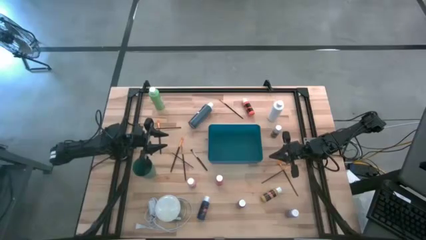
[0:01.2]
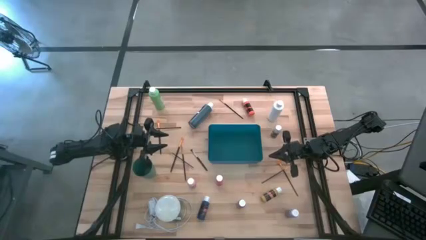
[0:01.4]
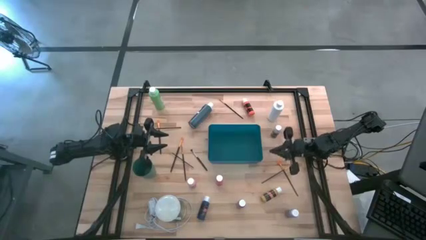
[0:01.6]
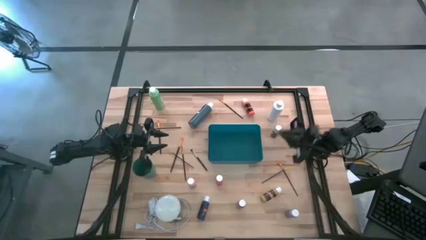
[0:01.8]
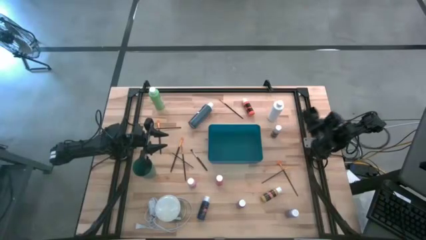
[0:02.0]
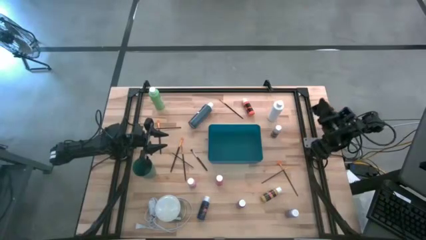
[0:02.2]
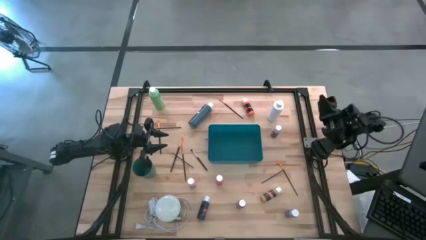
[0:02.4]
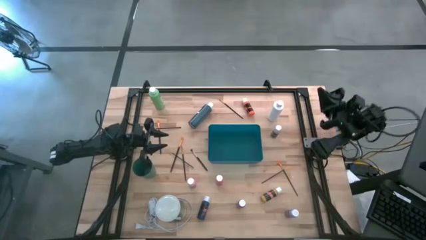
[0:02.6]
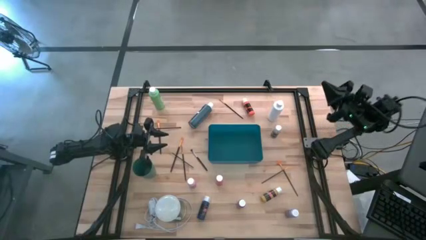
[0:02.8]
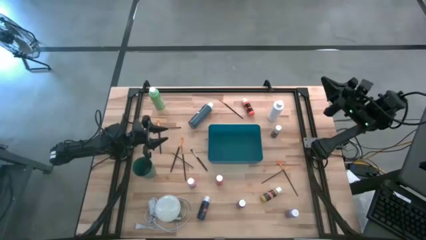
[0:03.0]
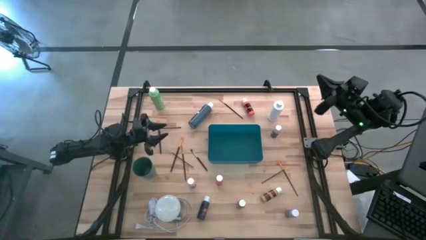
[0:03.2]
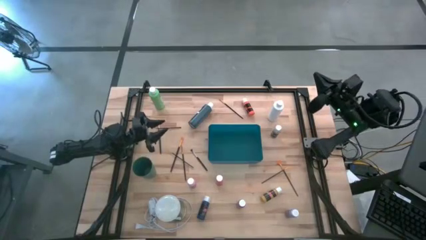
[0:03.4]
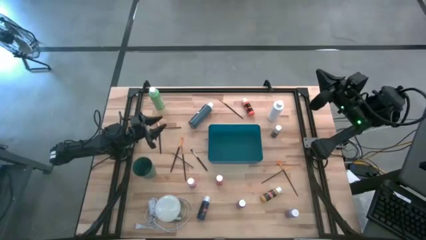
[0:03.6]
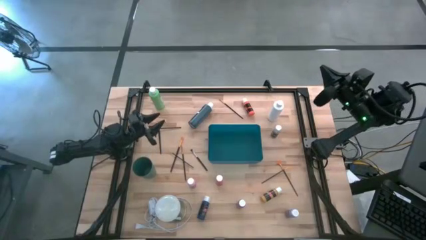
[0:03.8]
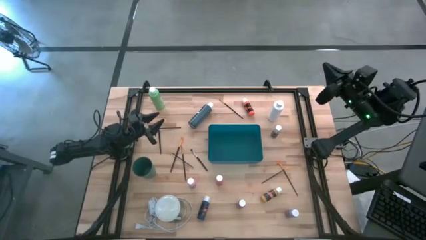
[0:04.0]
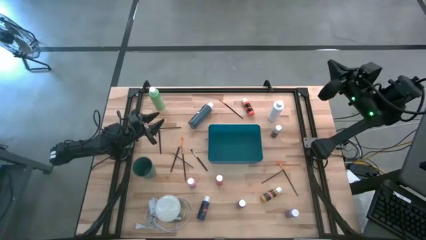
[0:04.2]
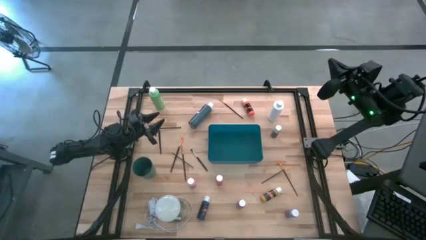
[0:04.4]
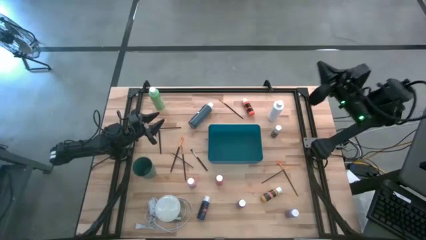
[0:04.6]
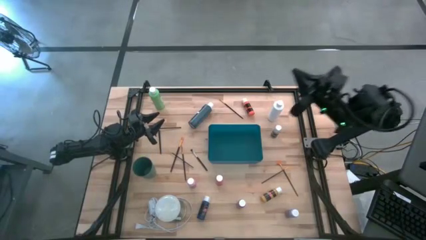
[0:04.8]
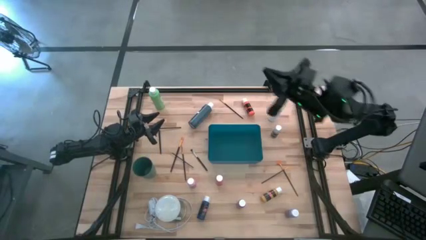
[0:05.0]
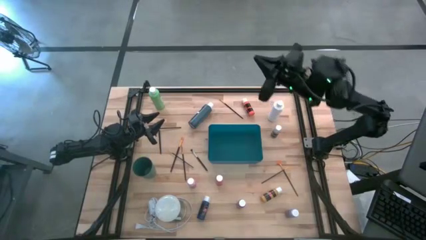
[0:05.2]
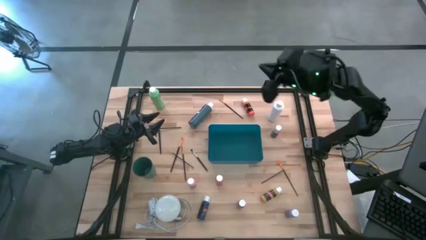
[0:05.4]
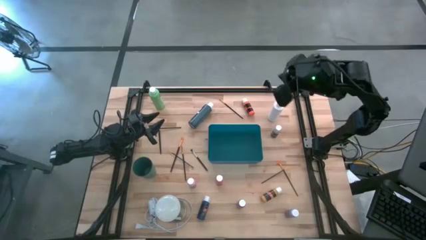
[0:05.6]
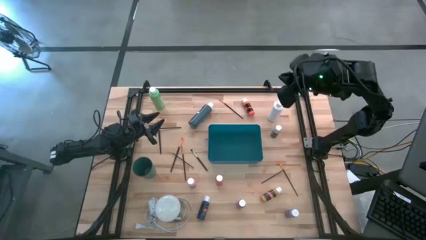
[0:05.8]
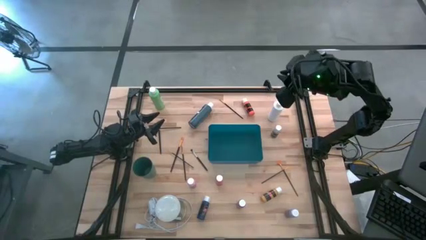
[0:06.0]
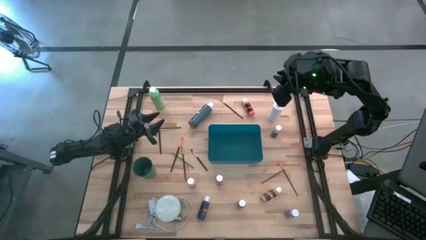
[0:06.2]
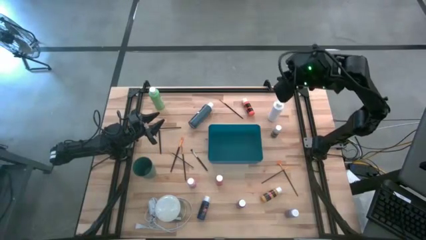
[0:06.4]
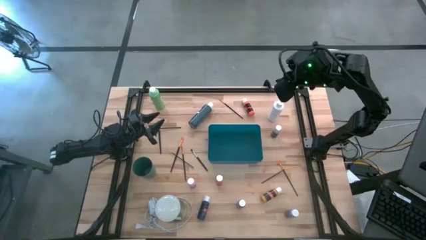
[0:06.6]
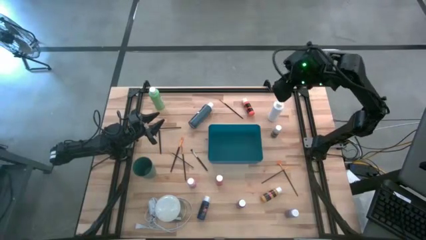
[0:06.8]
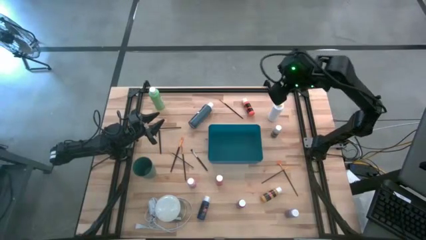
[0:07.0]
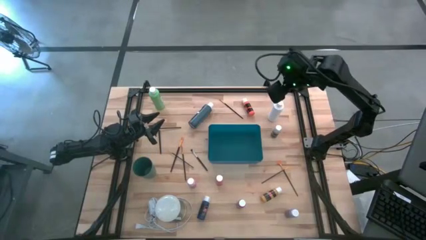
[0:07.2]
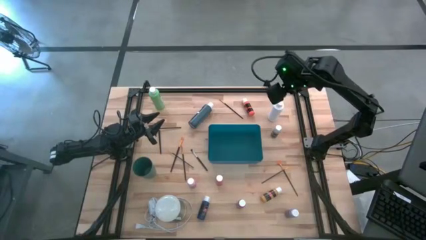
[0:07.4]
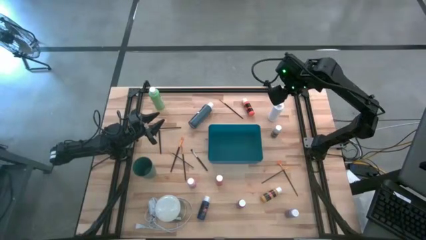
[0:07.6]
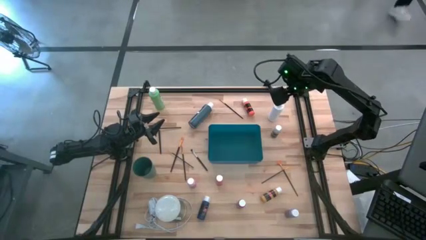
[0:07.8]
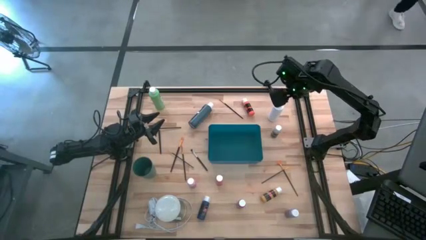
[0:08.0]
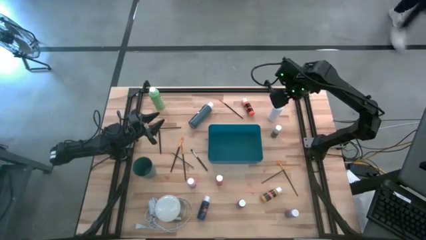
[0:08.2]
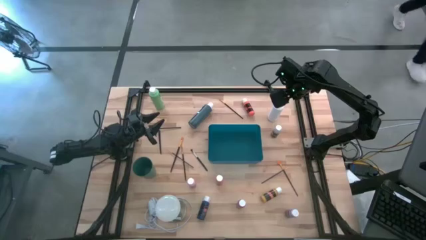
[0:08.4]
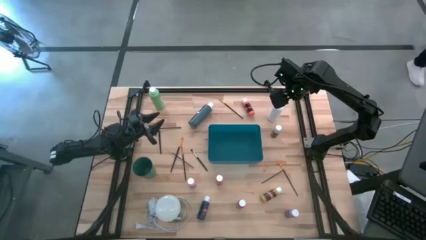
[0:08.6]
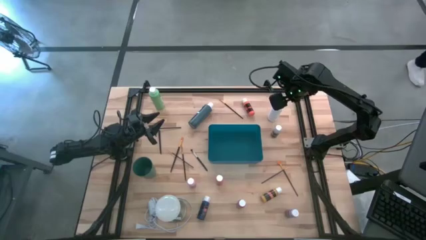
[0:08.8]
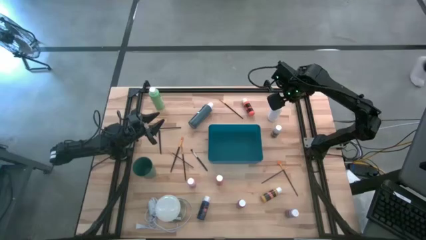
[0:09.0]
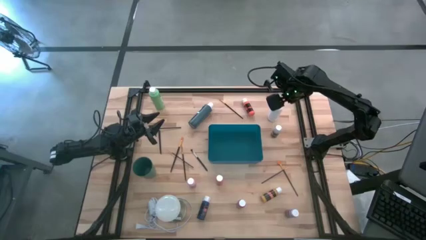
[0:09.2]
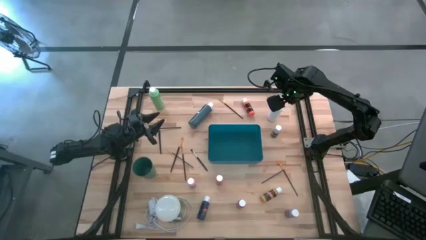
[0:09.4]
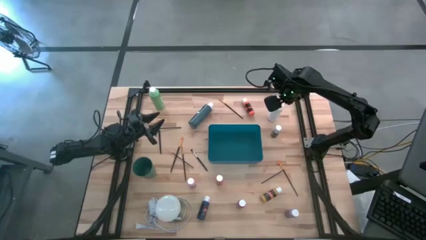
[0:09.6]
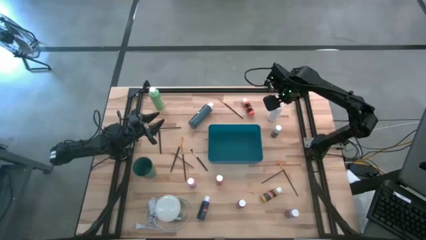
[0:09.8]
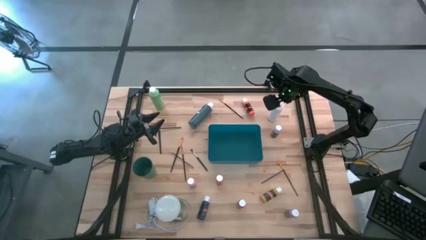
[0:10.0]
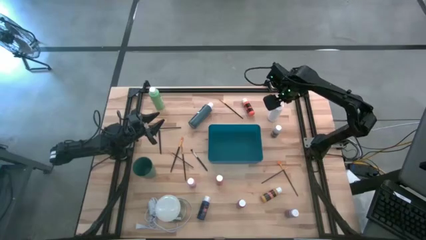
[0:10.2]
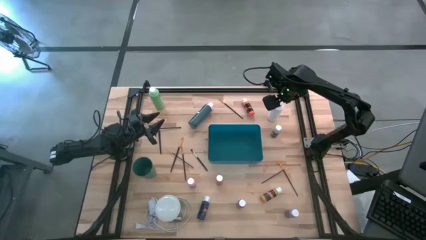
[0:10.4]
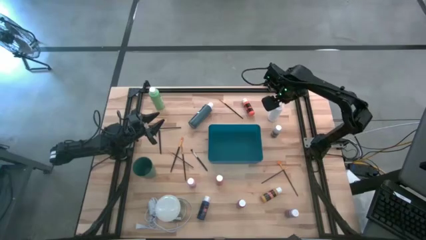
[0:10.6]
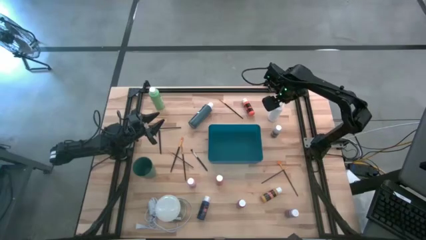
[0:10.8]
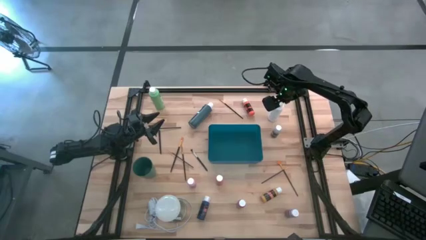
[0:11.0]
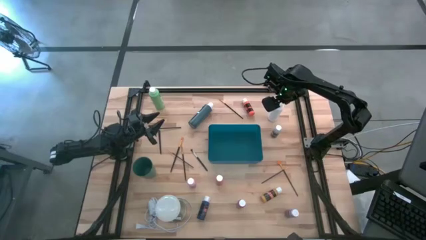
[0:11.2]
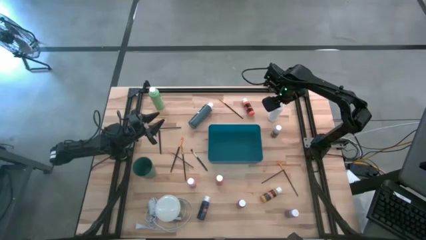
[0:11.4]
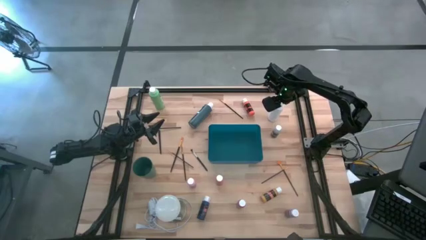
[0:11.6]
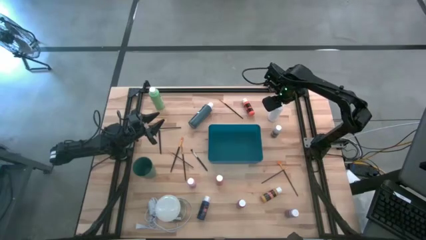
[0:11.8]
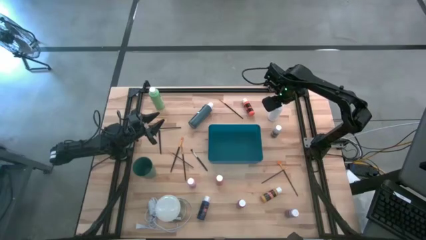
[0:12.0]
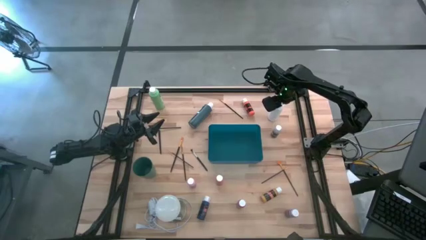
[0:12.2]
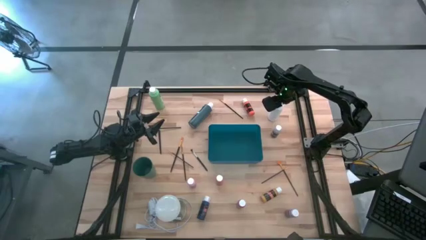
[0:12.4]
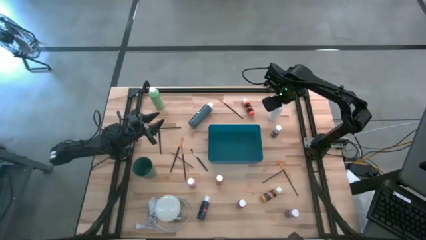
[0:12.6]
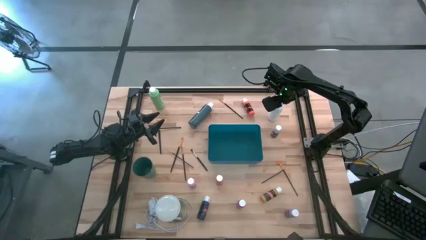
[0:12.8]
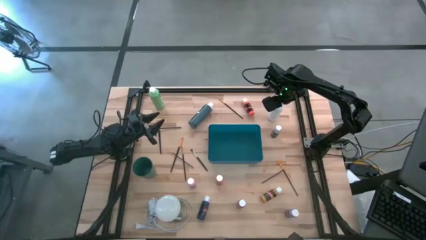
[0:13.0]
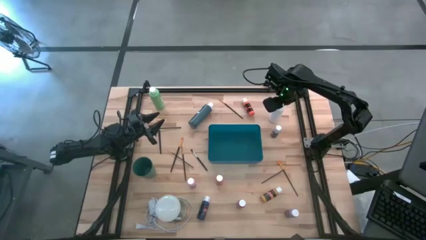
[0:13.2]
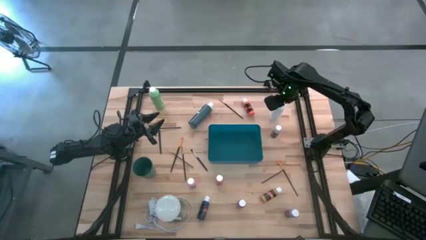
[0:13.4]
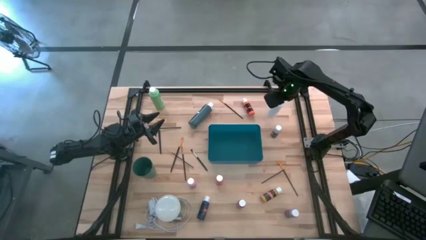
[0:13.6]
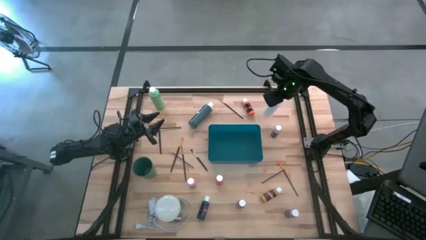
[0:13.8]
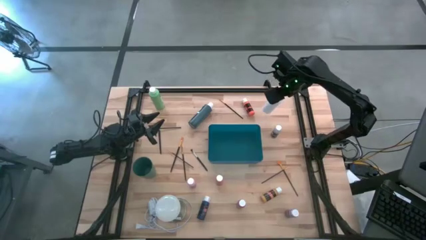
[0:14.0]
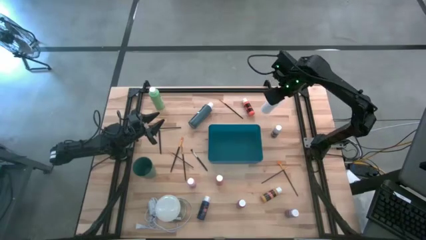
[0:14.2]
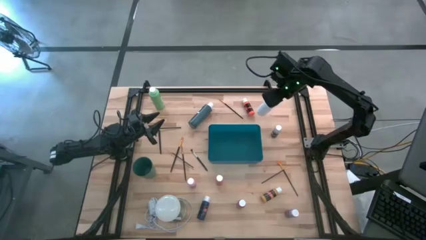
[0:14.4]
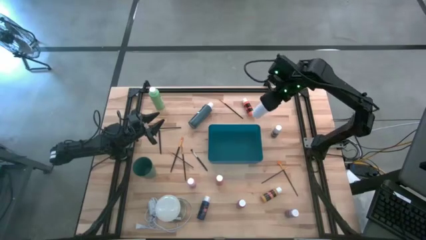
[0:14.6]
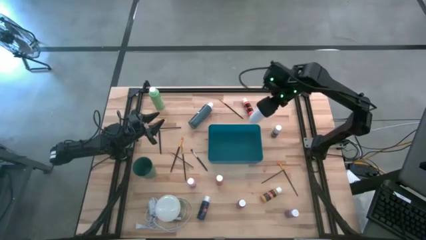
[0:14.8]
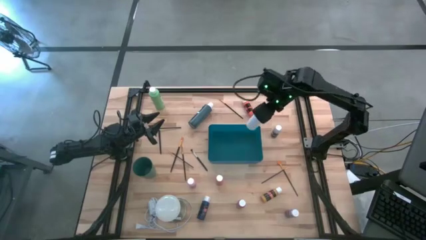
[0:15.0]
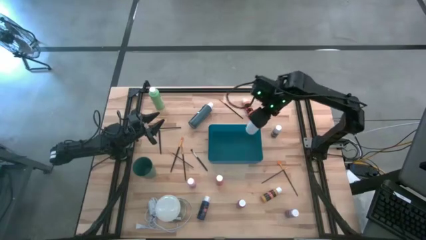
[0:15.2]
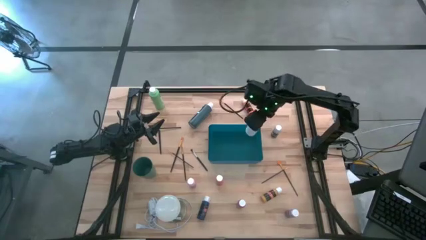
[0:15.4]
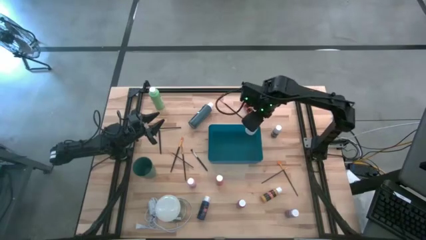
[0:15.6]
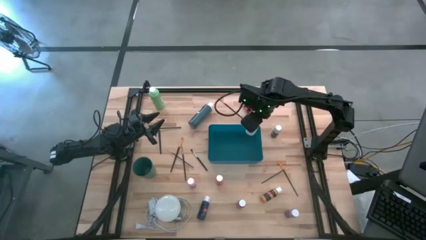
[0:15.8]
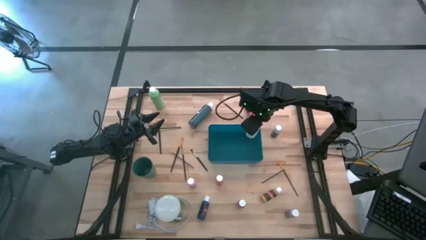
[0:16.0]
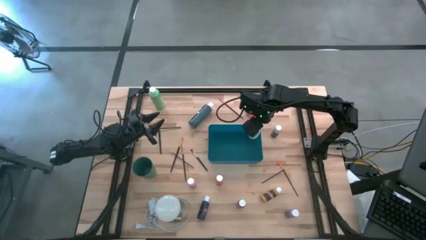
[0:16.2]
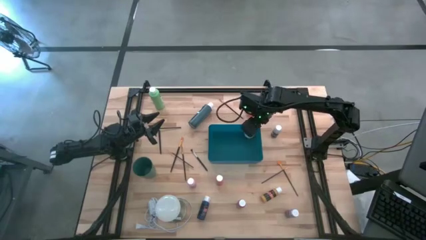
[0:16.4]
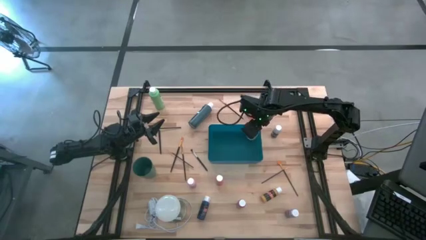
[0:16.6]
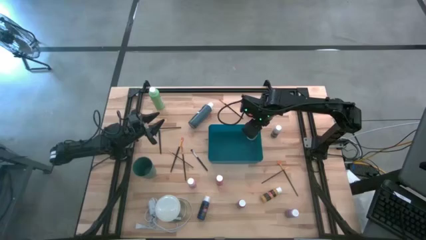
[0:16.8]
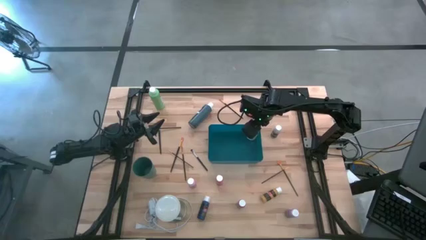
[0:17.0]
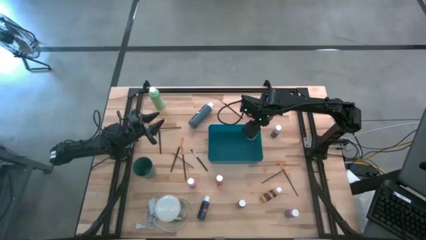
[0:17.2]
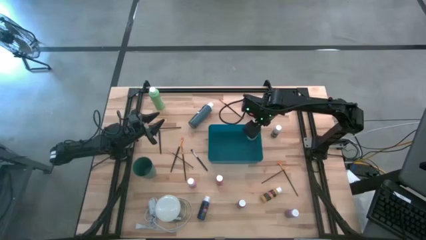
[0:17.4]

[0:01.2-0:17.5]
Task: Pick & Place Paint Supplies
Put the white paint bottle into the blue bin
